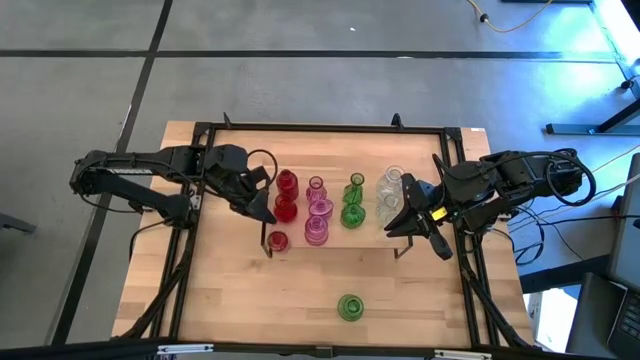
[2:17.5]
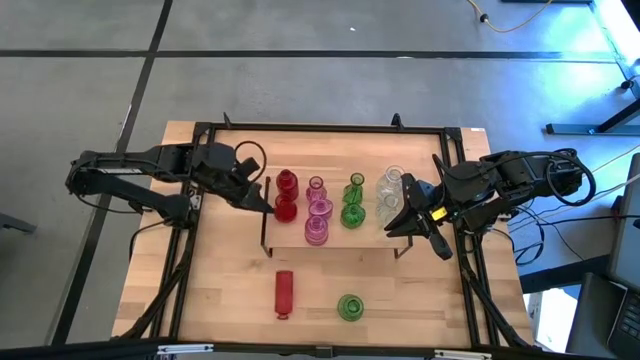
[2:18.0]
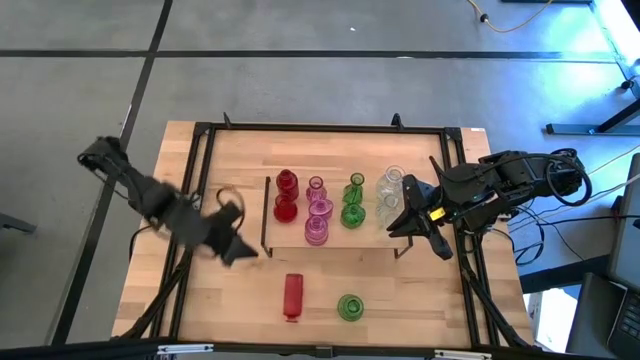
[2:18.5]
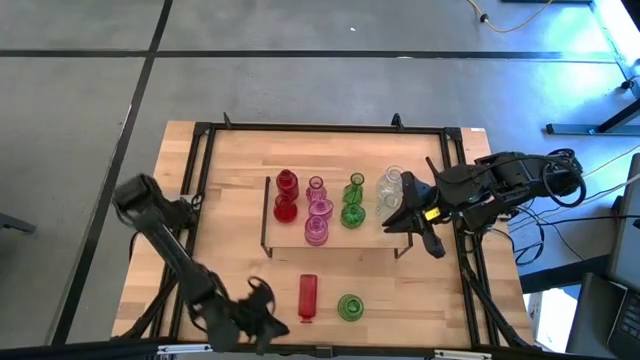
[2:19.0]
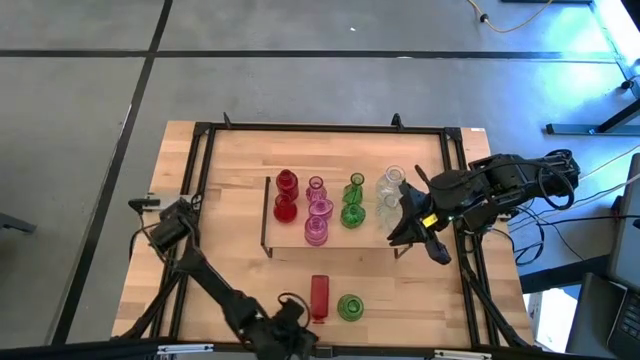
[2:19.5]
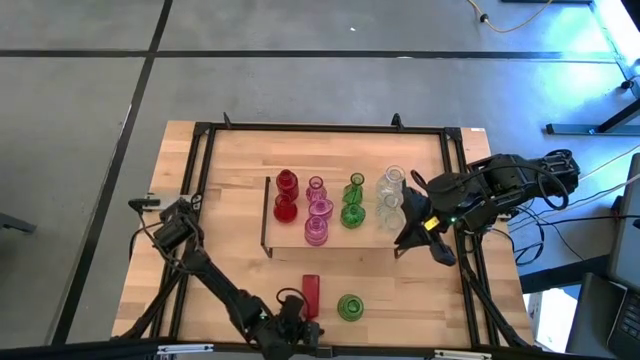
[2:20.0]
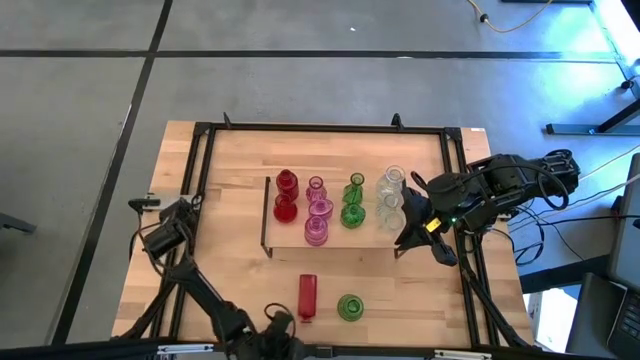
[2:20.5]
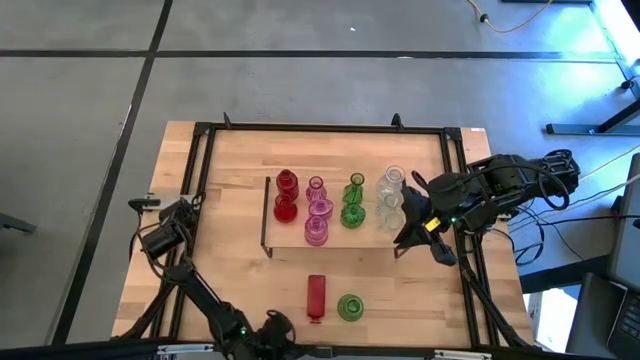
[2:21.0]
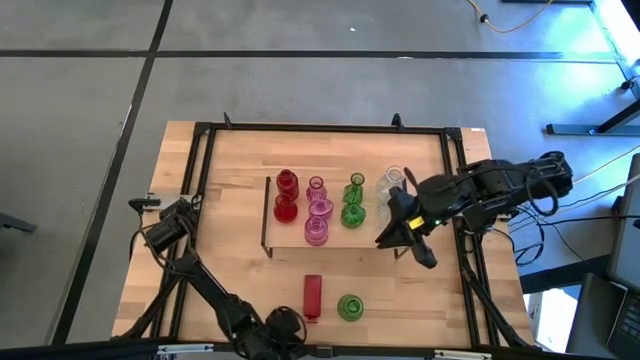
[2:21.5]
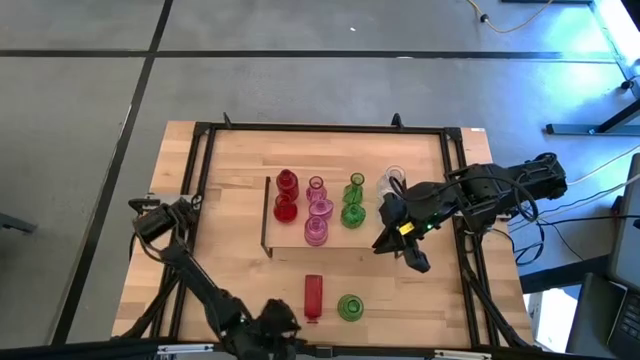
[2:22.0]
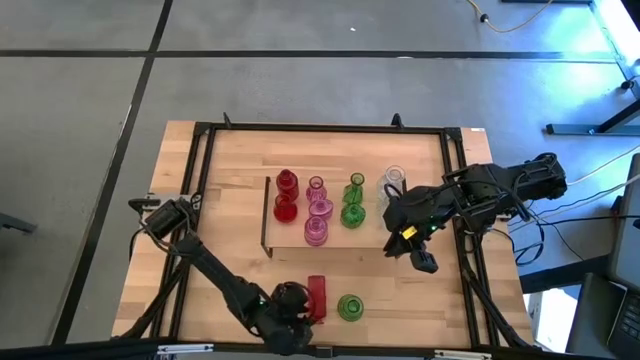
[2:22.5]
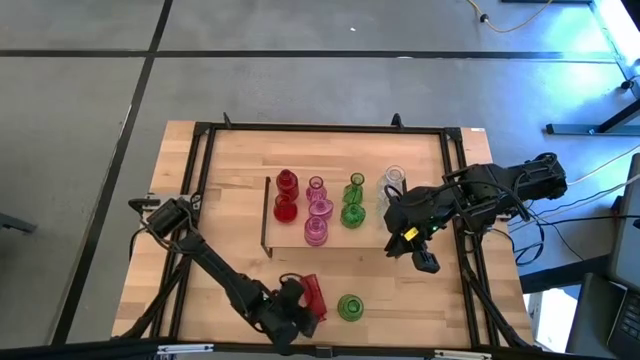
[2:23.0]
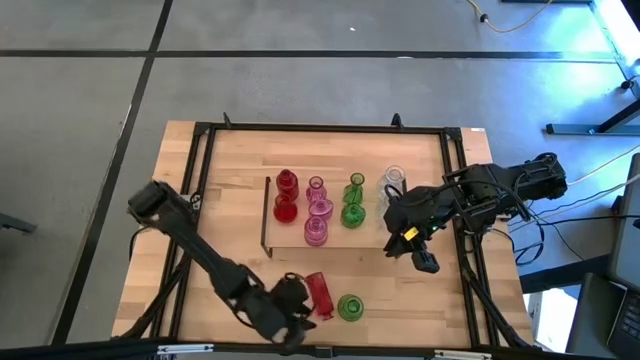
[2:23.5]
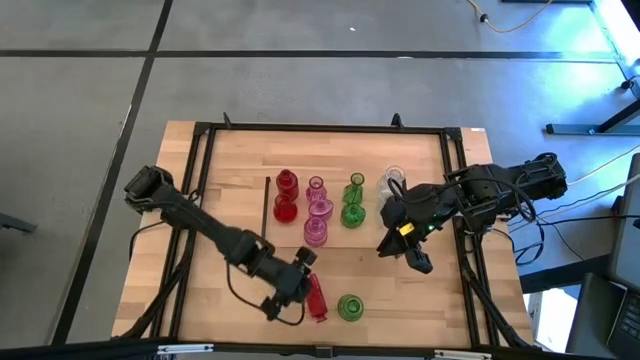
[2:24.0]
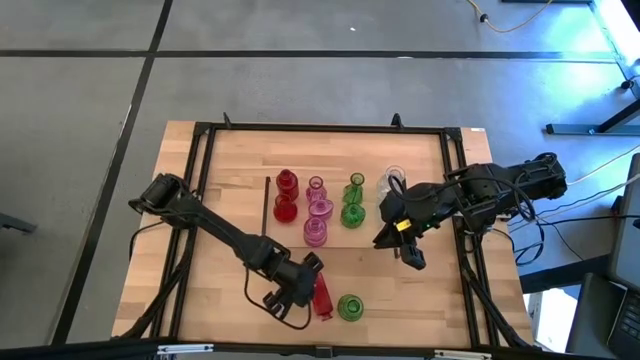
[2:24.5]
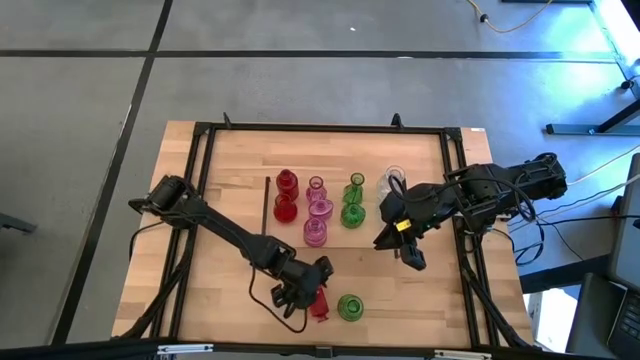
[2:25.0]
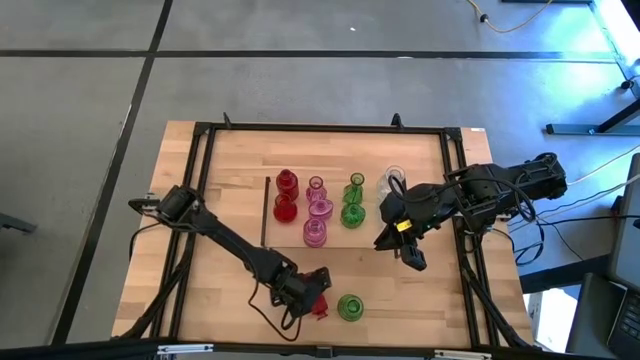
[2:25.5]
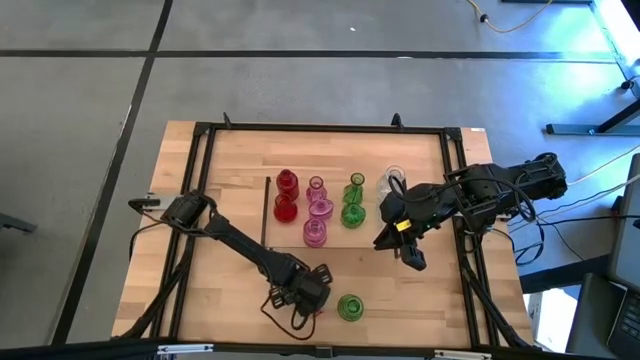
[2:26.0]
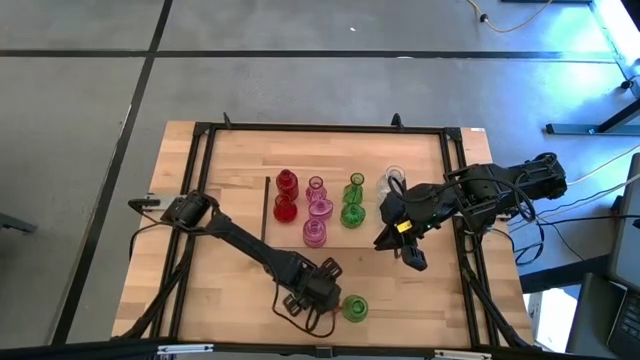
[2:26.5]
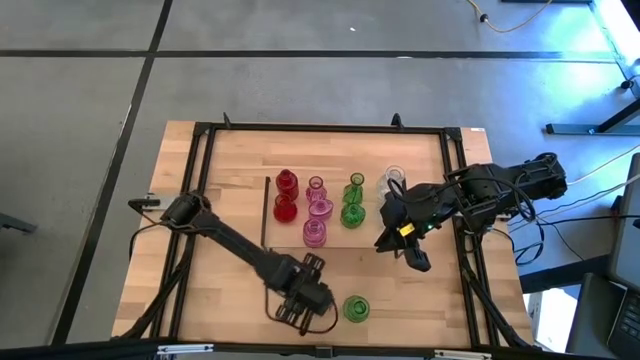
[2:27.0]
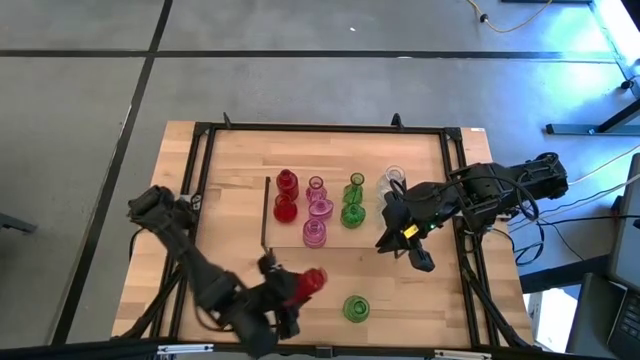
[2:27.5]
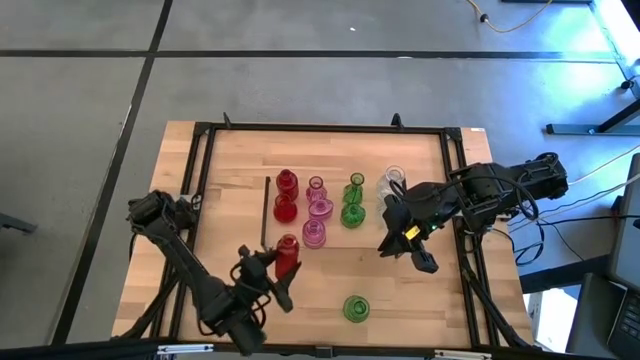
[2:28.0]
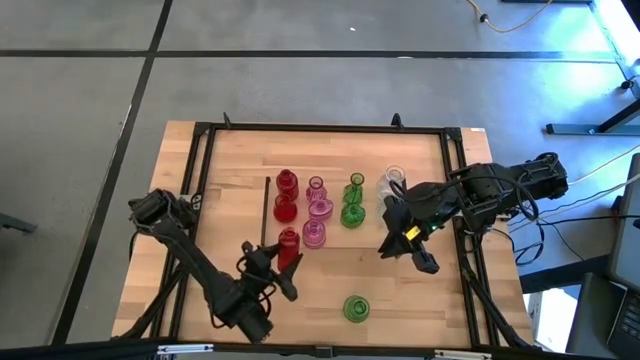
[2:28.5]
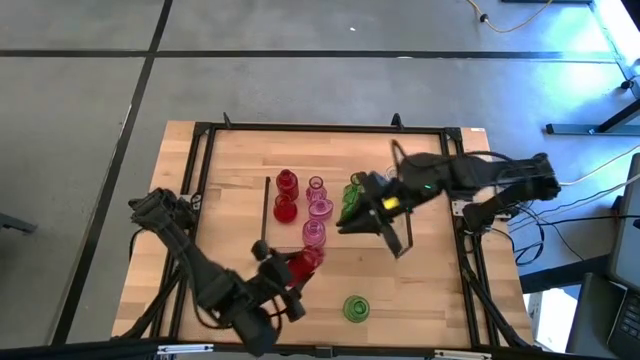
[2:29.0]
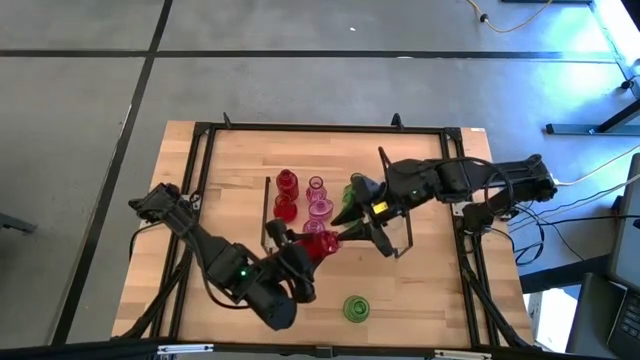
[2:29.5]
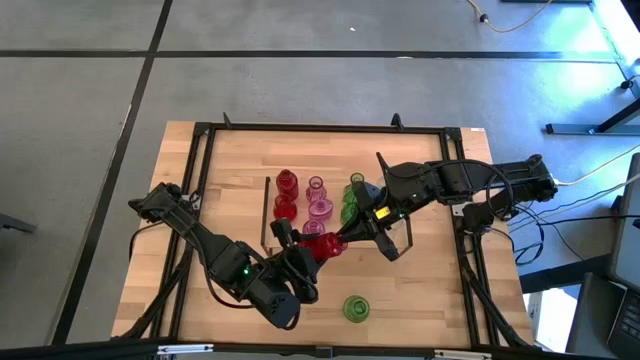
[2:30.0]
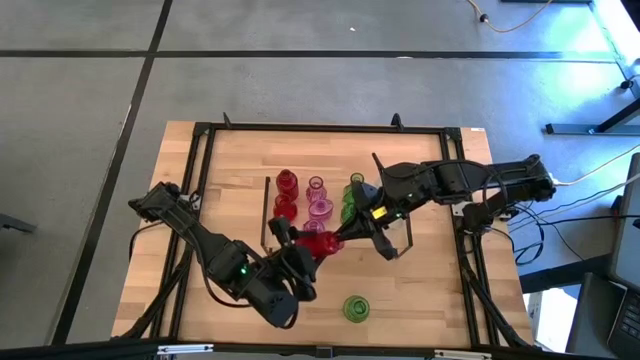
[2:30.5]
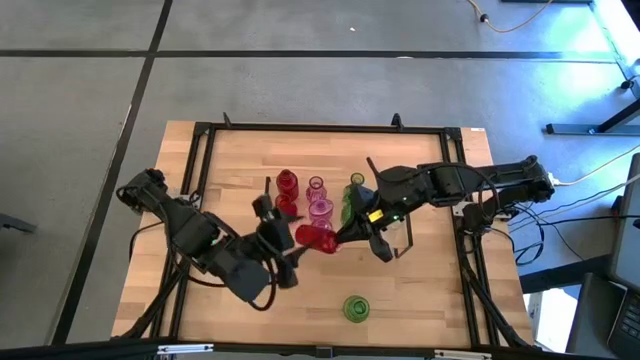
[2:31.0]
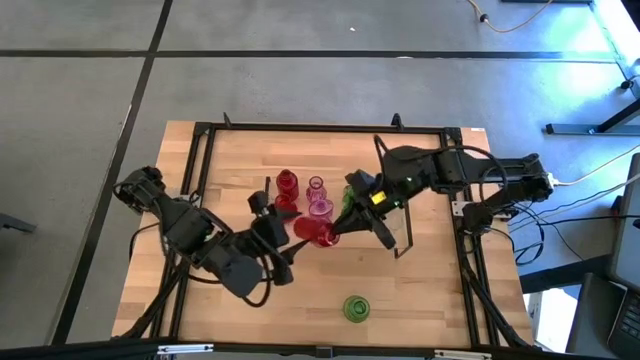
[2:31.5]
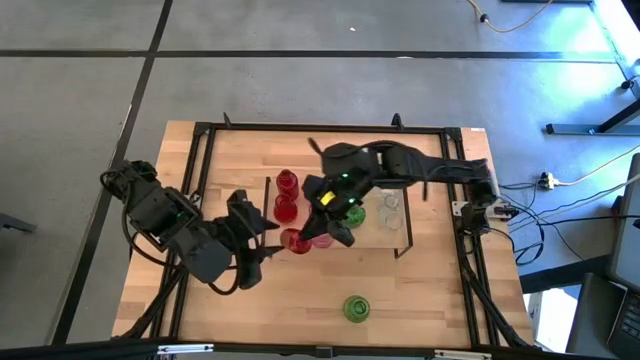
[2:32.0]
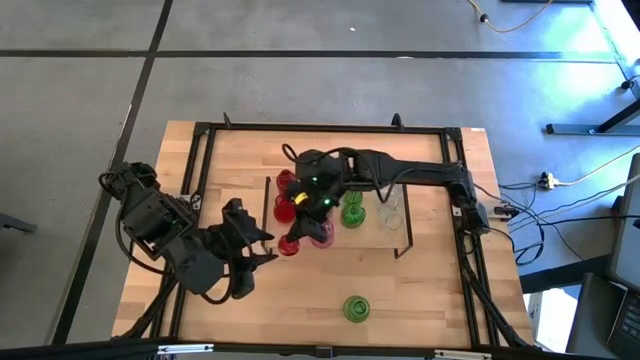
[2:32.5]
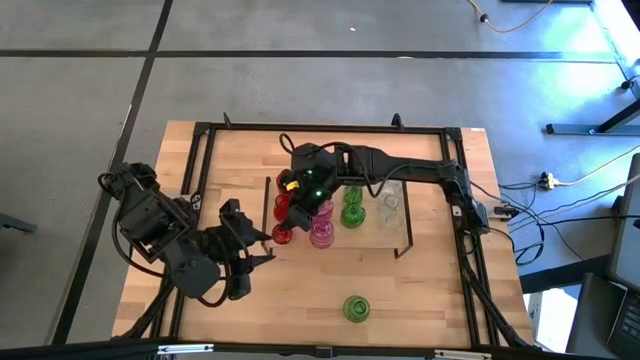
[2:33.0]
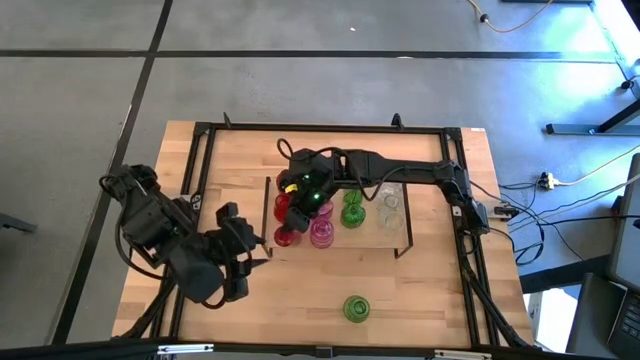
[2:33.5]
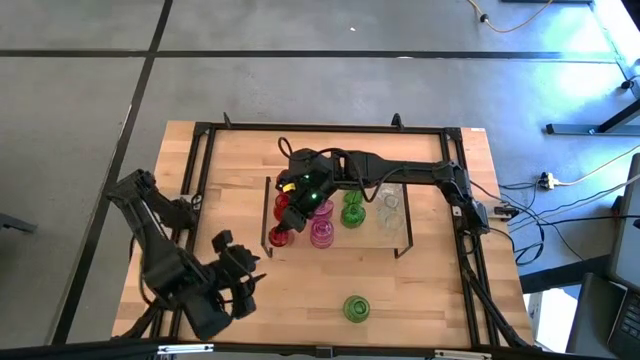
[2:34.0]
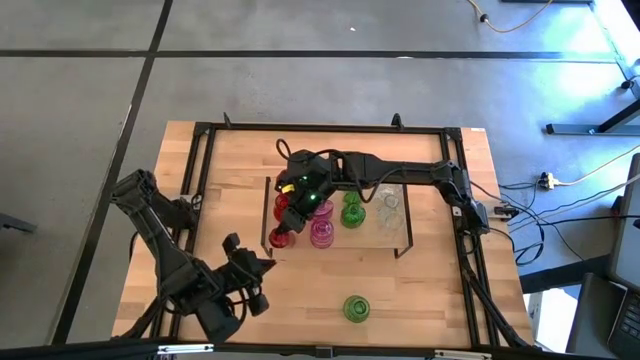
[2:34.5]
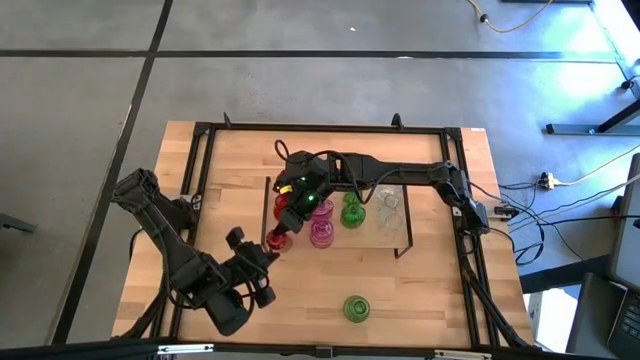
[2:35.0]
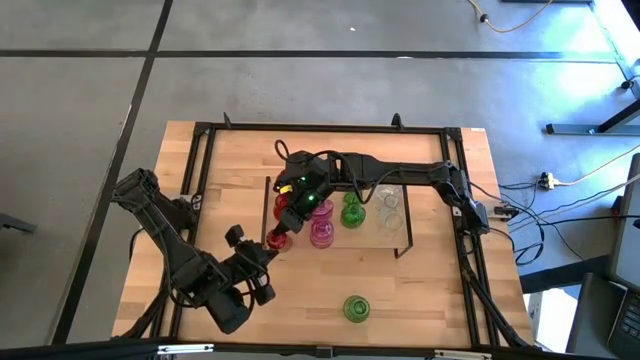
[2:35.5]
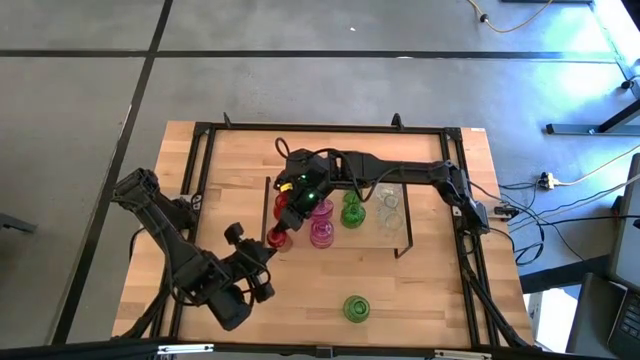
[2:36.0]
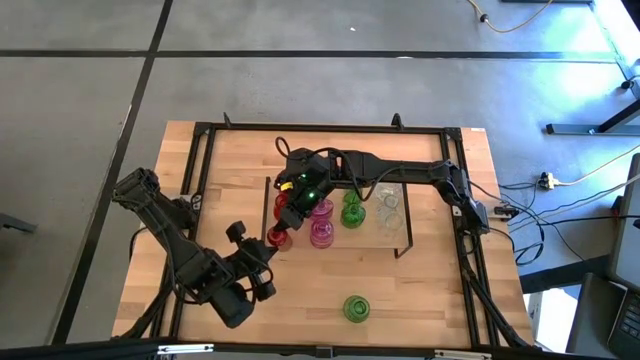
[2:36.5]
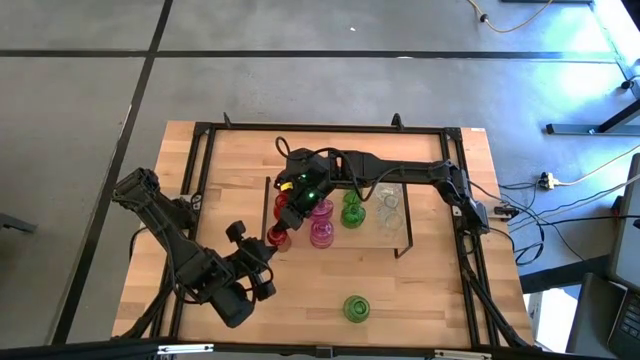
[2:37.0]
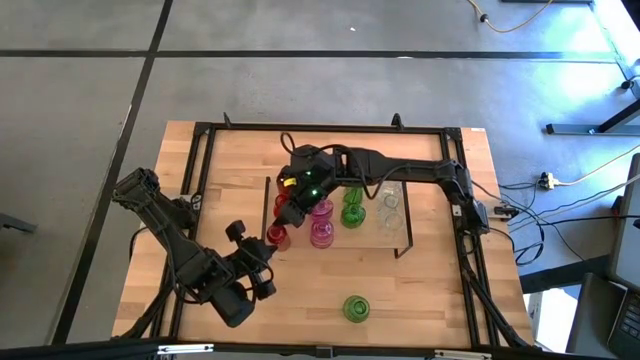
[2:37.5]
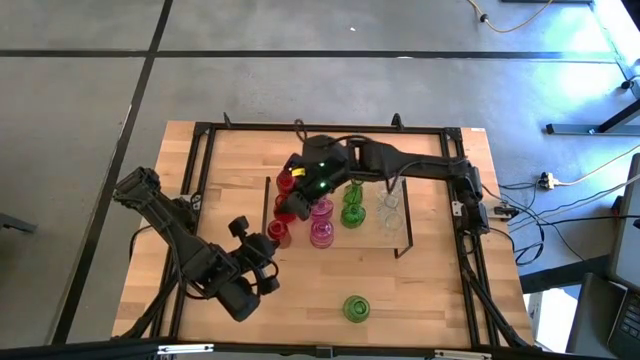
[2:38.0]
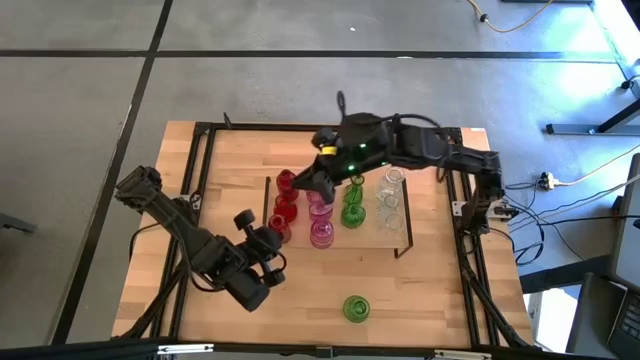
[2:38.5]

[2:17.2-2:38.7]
Task: sort vases onto shelf
Put the red vase on the shelf aligned with the other red vases

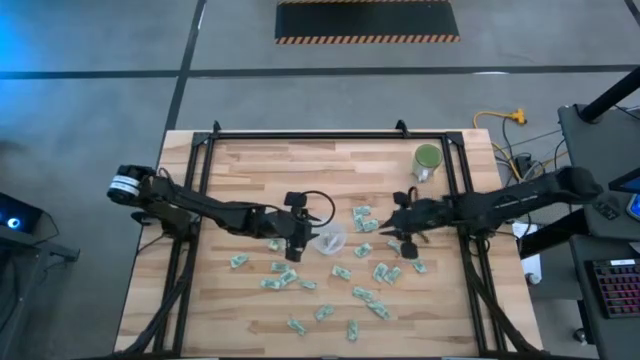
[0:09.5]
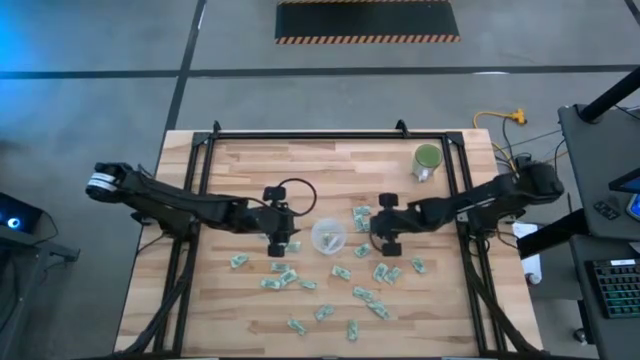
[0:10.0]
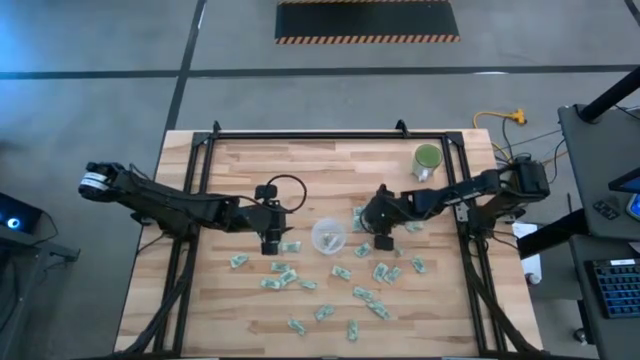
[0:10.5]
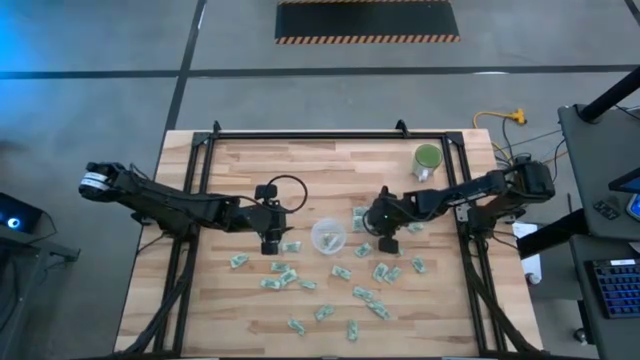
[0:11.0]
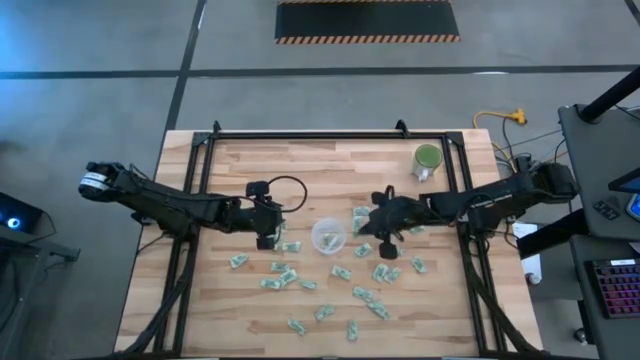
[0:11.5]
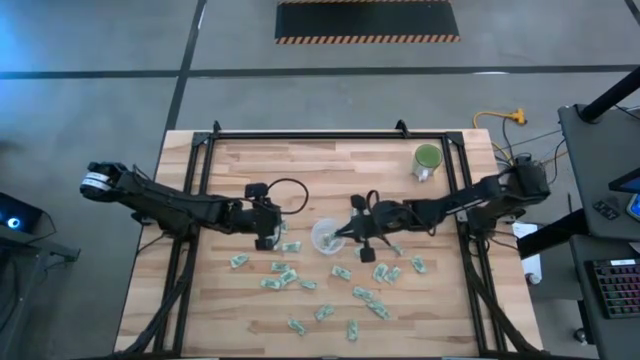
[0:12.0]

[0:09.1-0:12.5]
Task: Pick and place Stevia / Truvia into bins
Put the light green stevia packet into the transparent container
